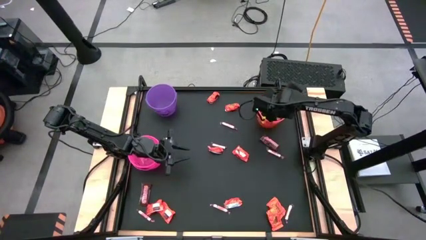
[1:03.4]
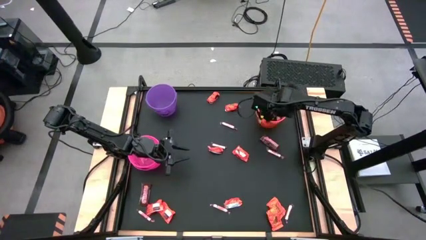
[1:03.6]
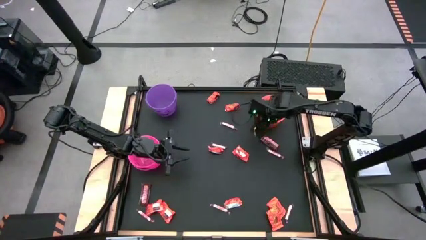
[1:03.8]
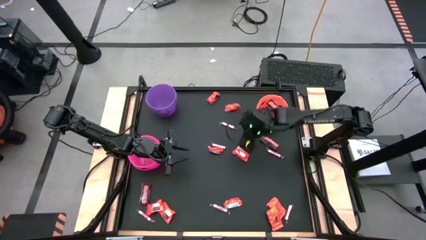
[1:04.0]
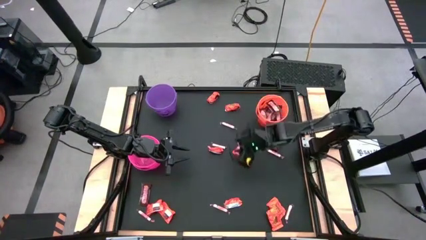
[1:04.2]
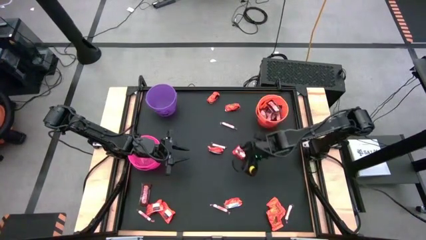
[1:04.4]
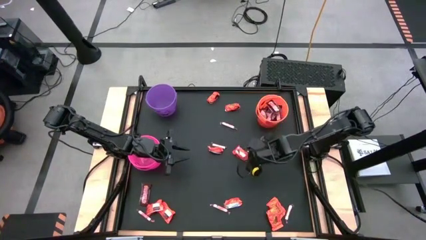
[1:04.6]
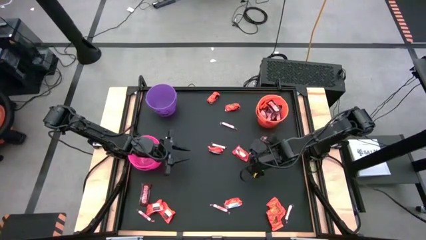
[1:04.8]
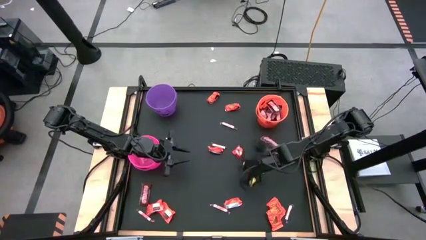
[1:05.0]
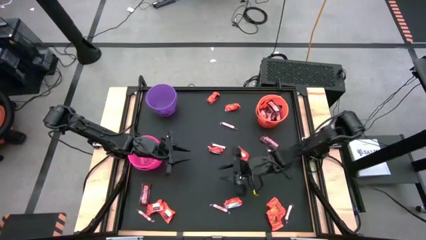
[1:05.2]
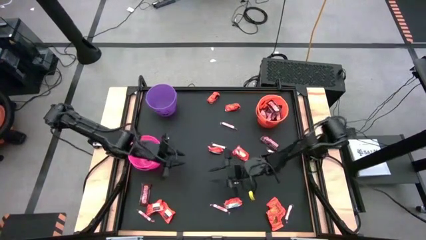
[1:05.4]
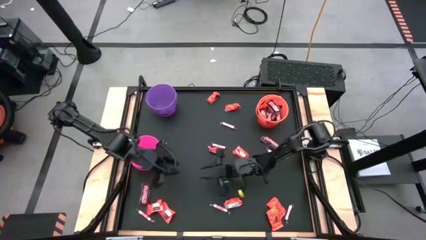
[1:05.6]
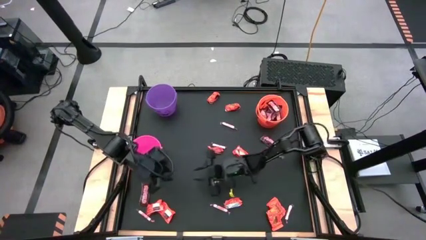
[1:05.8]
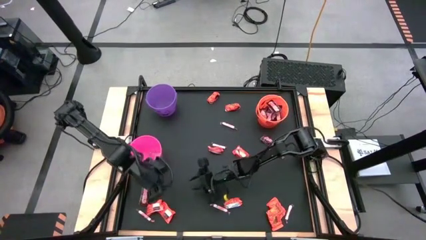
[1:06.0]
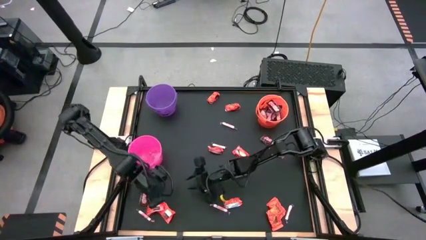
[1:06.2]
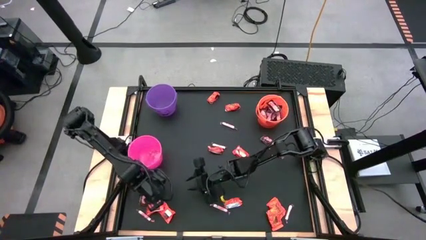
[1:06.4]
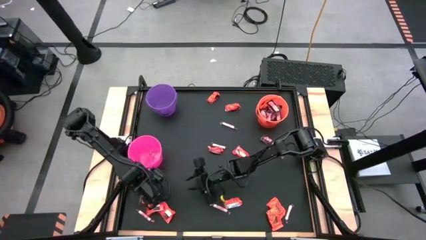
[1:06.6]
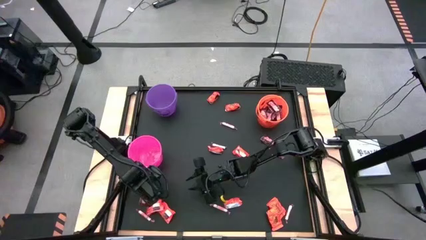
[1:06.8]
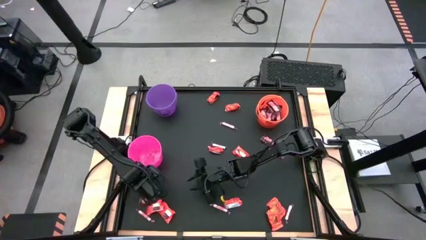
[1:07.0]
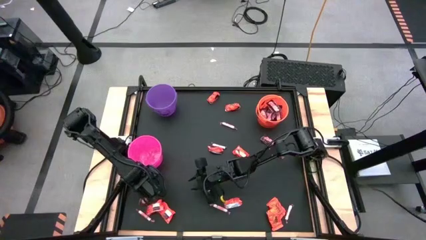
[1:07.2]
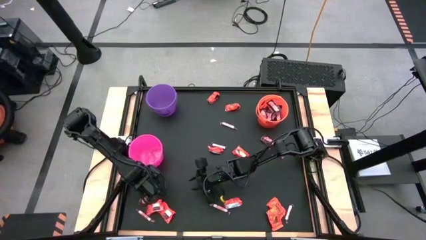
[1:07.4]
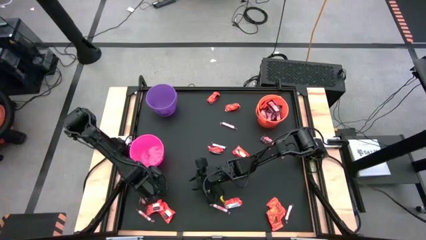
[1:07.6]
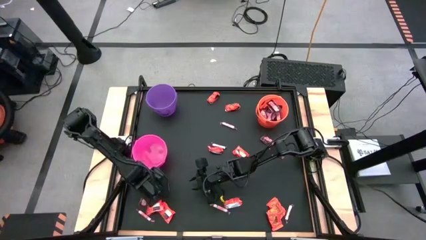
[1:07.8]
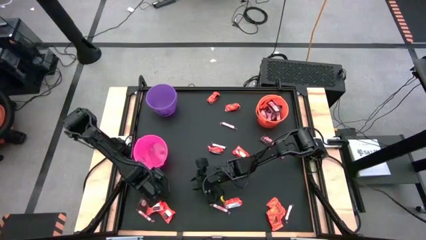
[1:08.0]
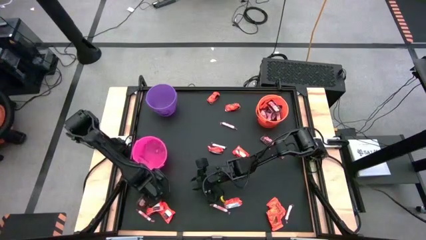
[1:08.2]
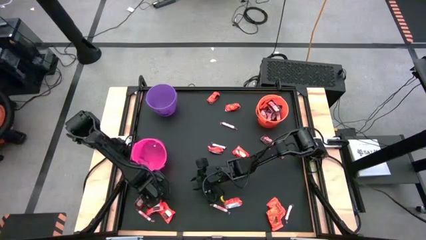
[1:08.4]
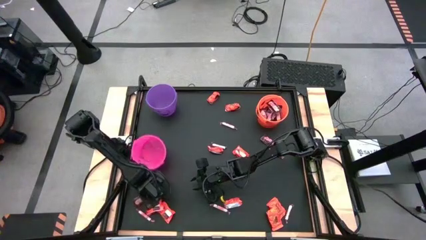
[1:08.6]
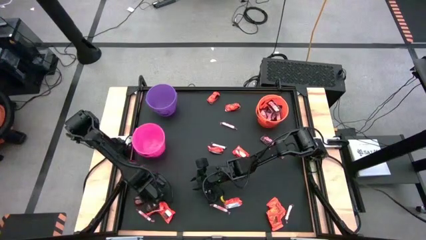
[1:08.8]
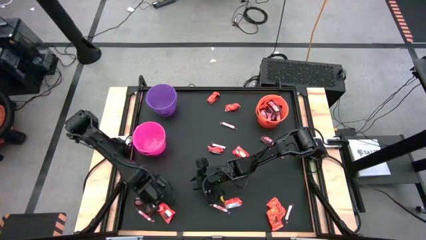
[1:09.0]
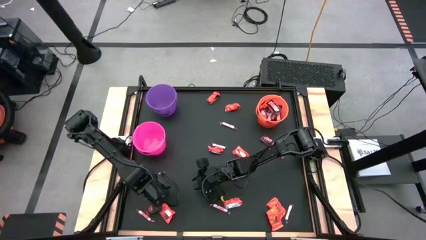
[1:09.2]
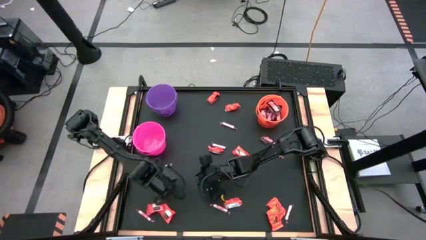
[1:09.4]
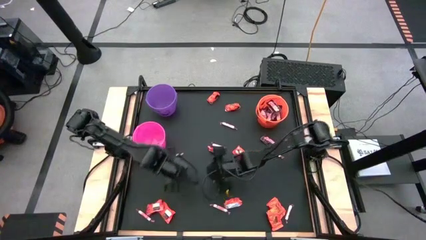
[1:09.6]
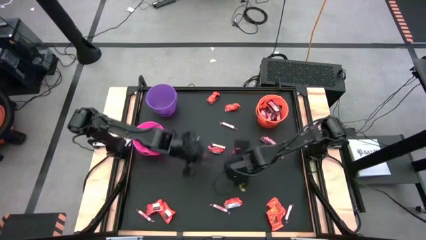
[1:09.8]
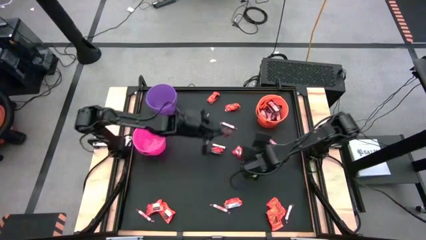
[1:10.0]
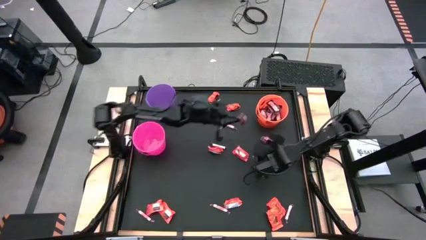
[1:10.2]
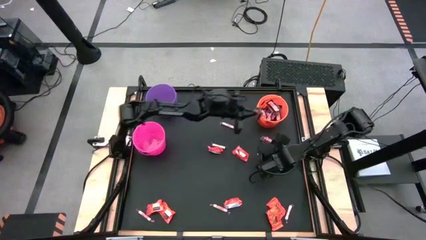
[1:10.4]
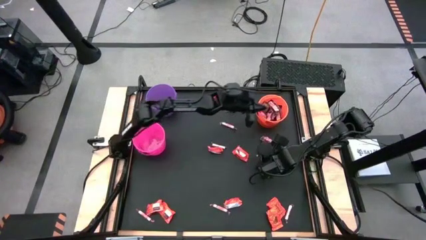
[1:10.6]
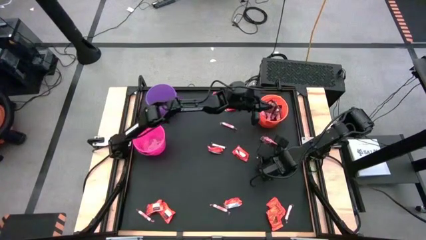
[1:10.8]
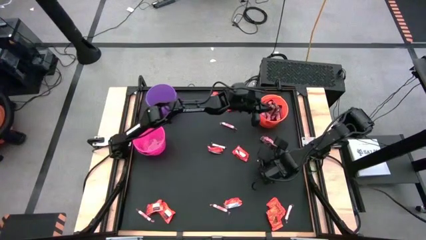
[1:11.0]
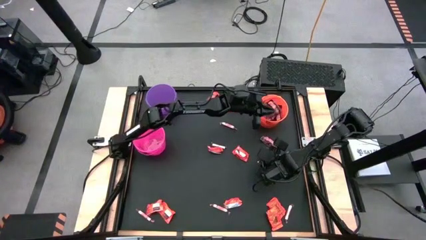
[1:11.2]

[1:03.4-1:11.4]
Task: Sort candy by brand, put in halloween buckets
Put the brown candy into the orange bucket

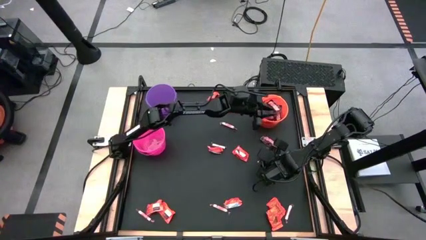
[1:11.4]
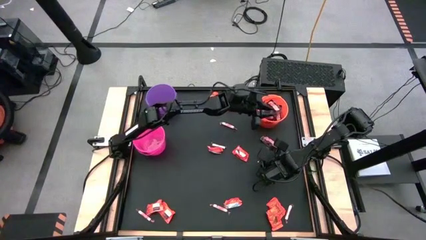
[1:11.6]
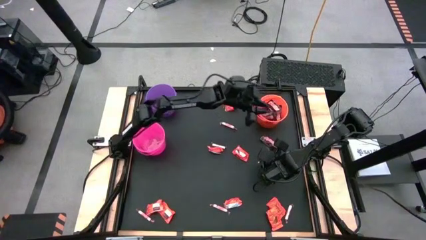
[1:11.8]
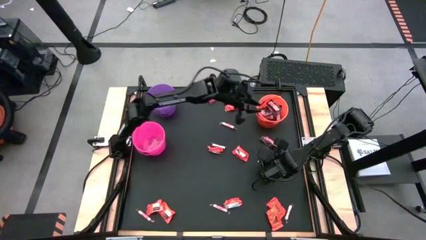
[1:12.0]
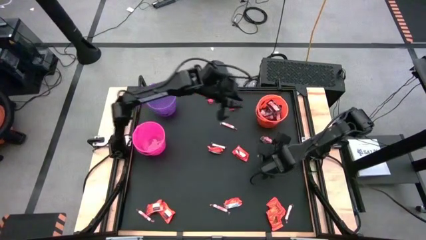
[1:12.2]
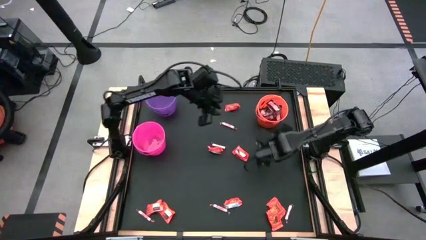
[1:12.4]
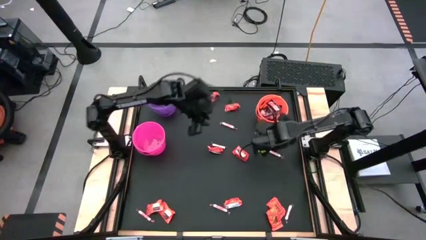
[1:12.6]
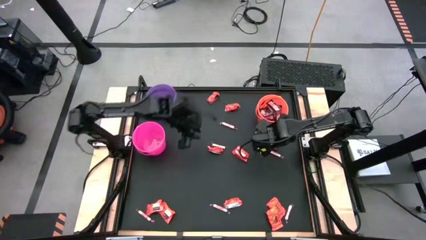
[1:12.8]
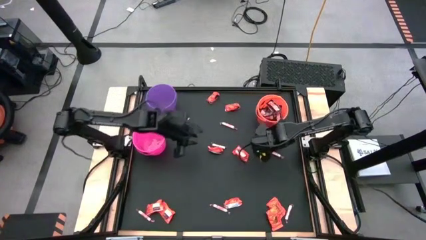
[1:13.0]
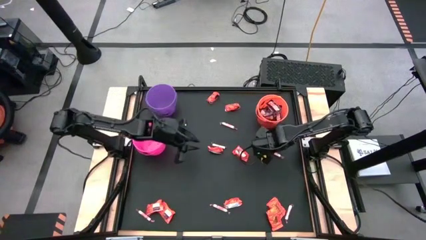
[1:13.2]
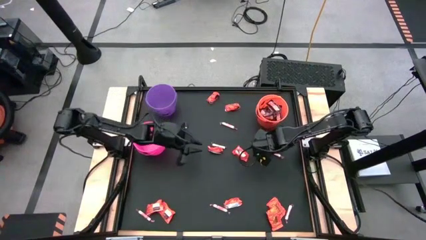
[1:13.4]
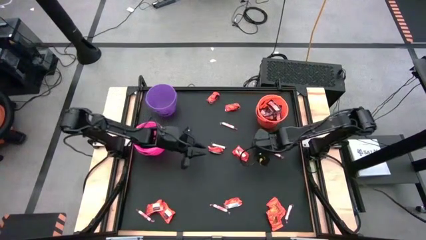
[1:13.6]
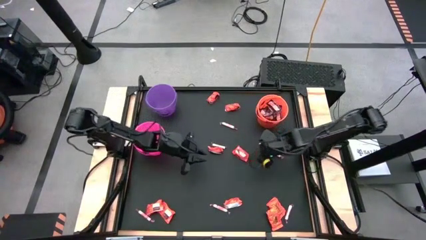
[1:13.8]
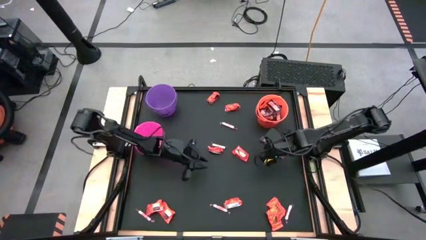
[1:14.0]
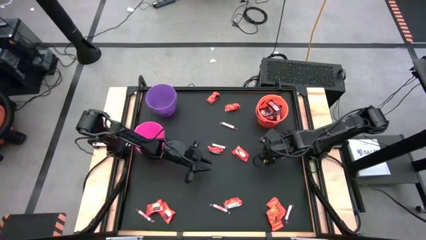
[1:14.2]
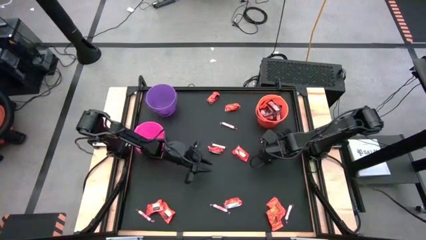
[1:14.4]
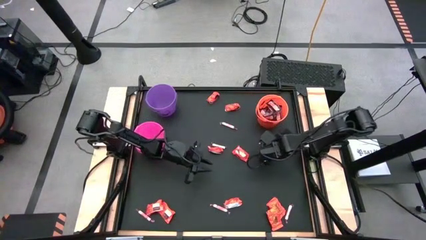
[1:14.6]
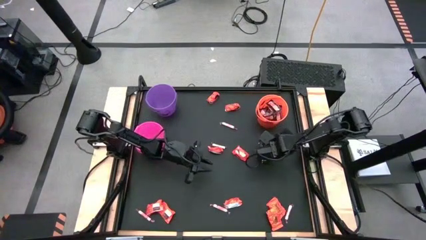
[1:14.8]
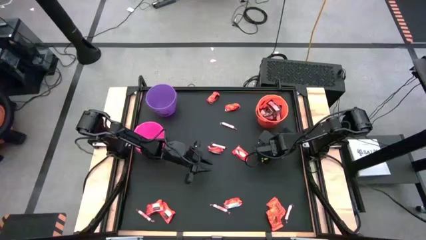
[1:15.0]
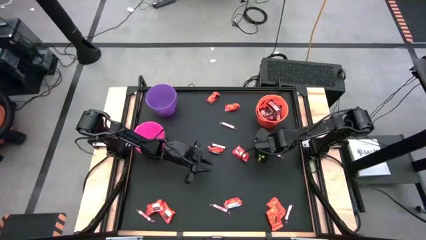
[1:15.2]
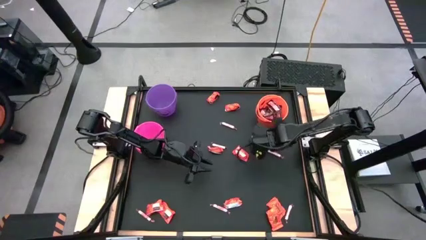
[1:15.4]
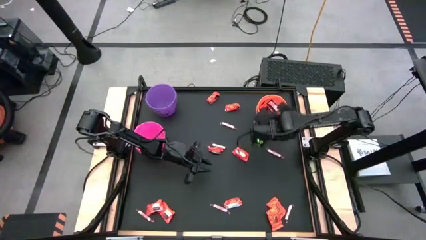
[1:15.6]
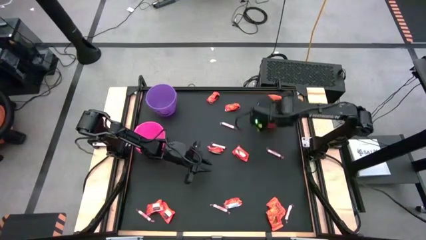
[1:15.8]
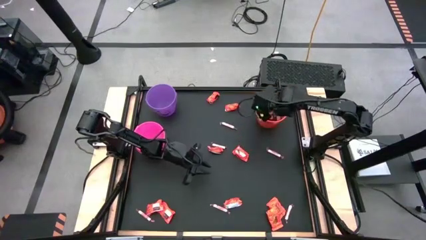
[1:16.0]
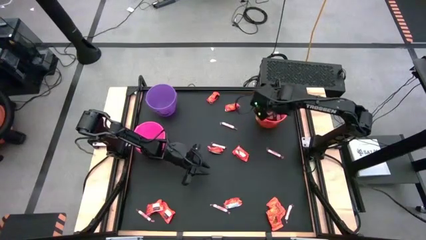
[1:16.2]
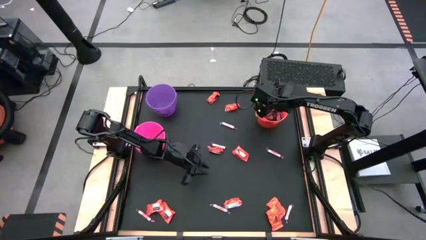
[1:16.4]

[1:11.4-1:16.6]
Put the brown candy into the orange bucket

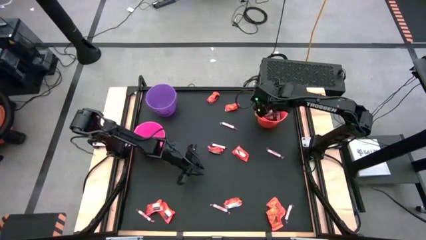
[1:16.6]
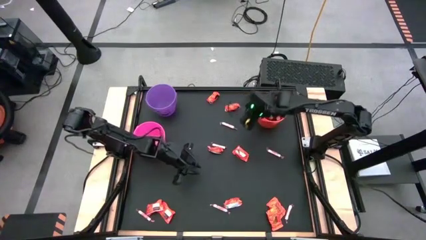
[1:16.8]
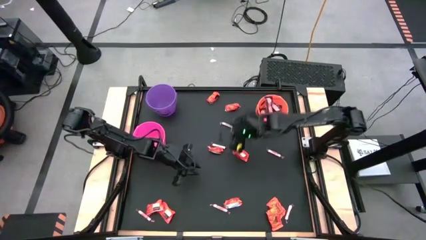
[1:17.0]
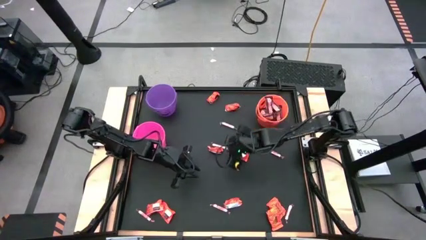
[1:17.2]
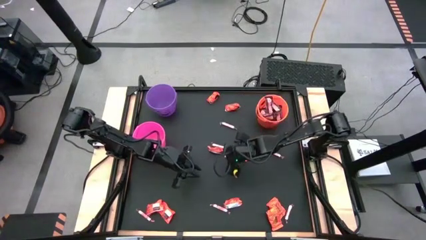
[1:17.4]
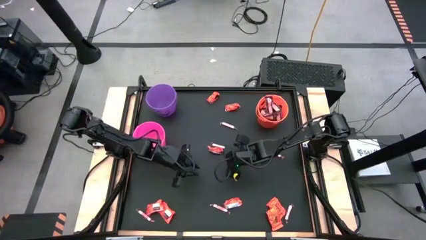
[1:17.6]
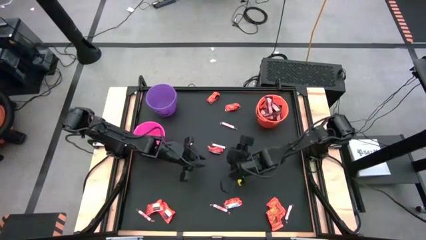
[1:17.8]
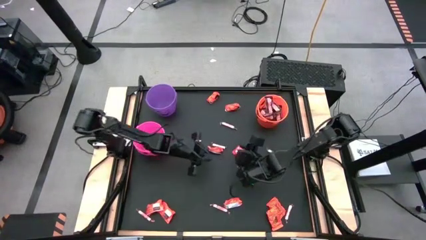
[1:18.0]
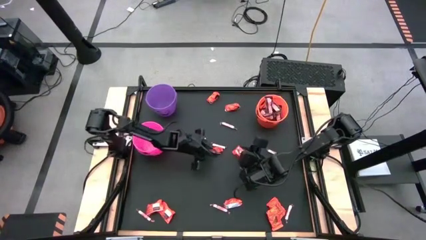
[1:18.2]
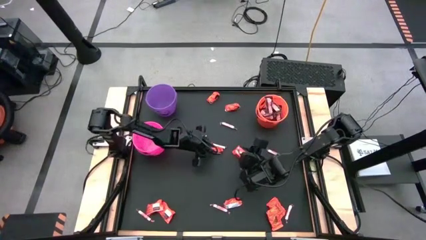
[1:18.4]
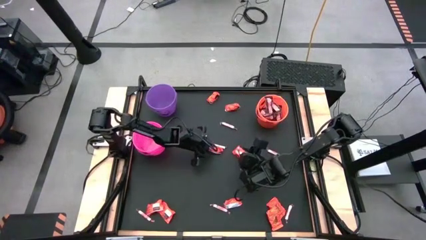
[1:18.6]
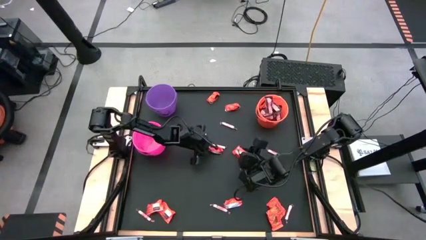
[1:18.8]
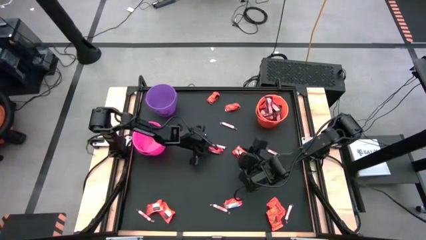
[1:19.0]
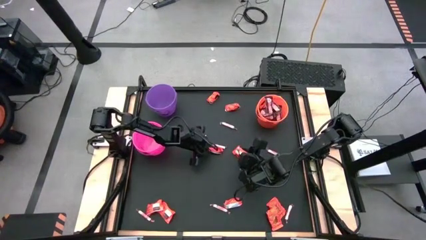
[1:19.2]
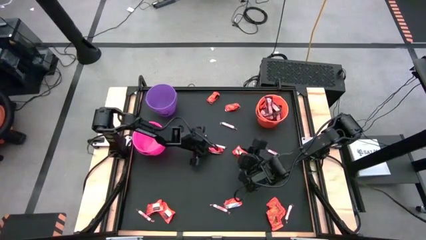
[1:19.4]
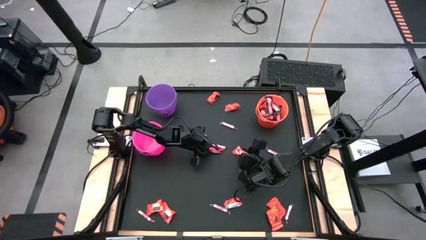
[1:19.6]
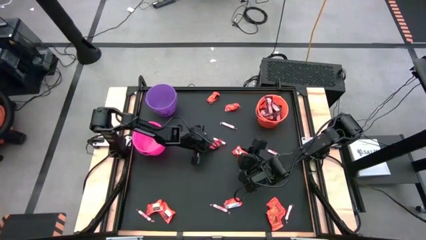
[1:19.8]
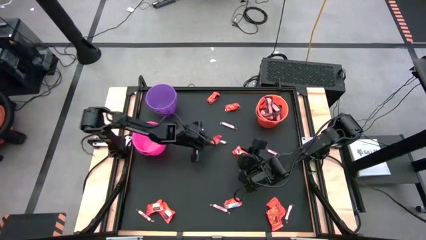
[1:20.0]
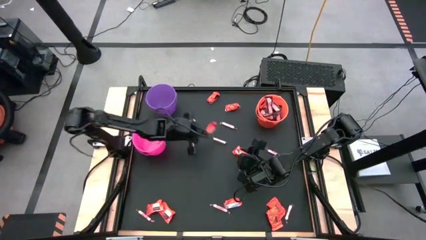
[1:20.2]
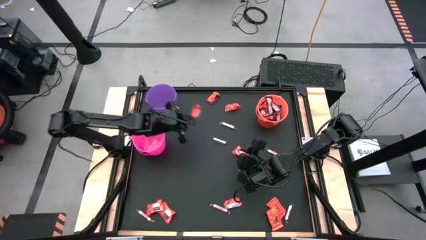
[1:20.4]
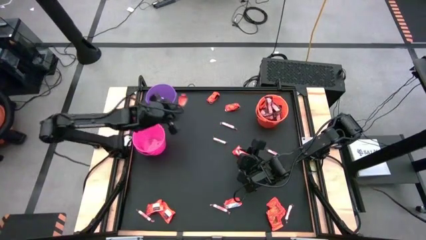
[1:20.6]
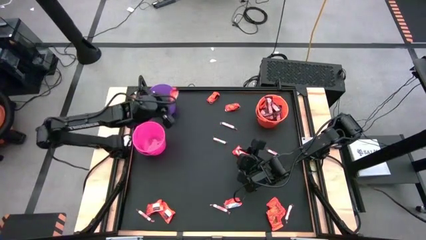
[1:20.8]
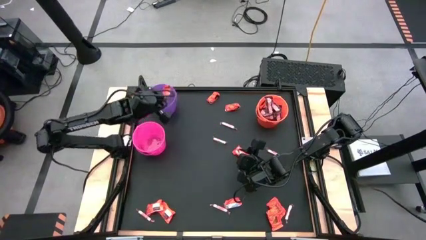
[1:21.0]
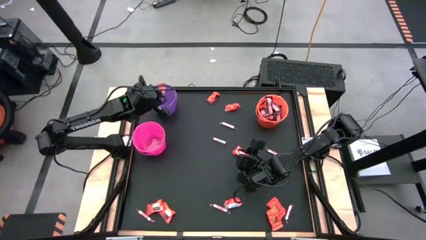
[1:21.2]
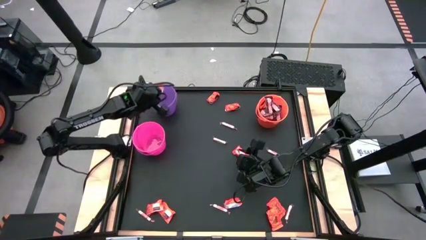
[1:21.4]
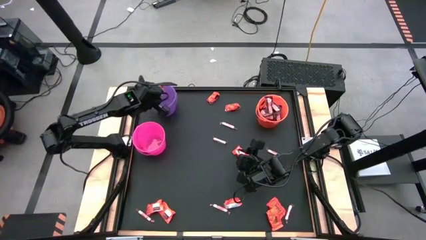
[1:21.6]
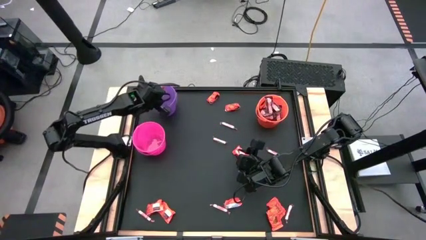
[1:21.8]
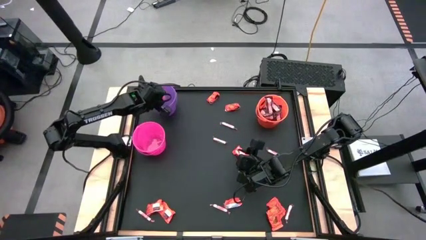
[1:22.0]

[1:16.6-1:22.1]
Put the orange candy into the purple bucket
